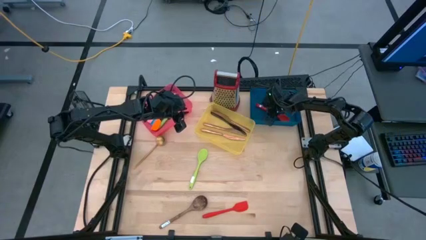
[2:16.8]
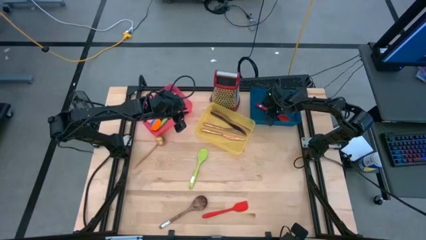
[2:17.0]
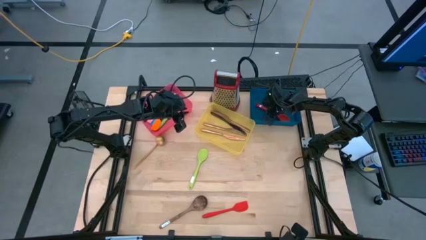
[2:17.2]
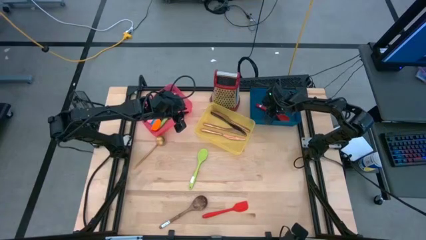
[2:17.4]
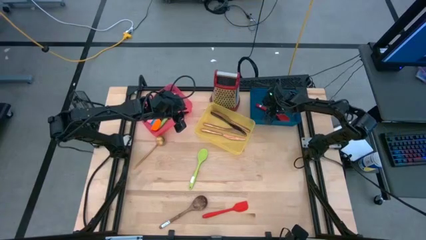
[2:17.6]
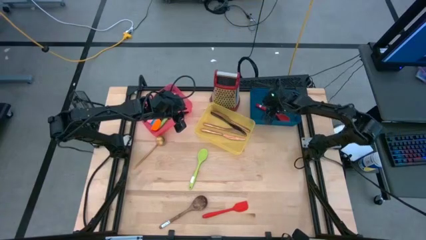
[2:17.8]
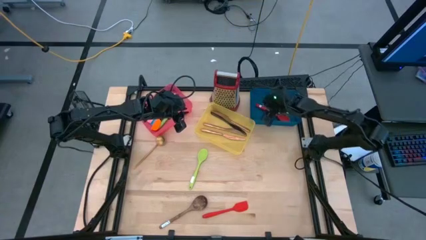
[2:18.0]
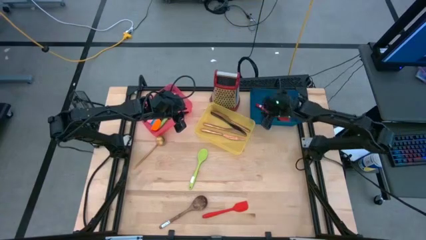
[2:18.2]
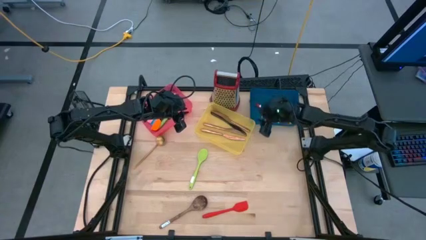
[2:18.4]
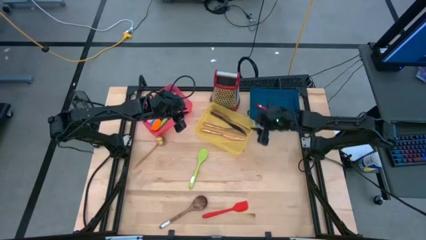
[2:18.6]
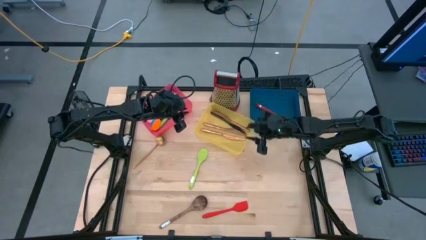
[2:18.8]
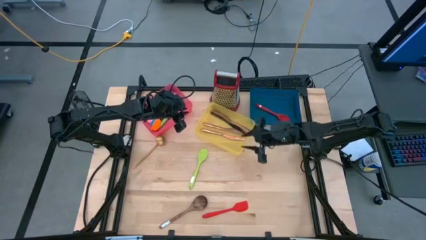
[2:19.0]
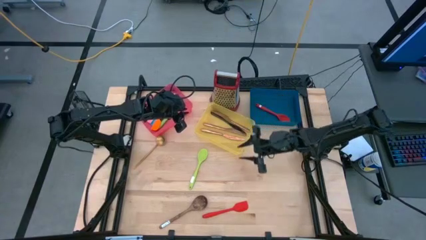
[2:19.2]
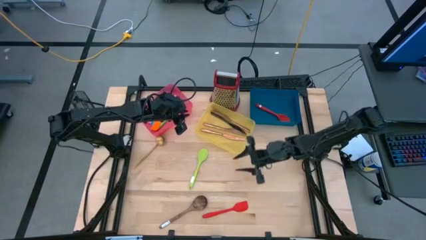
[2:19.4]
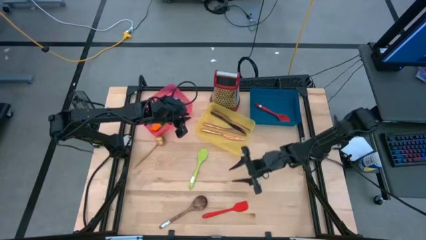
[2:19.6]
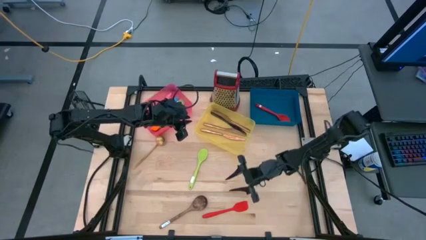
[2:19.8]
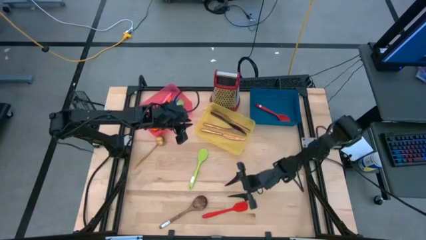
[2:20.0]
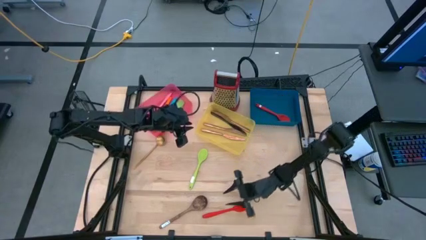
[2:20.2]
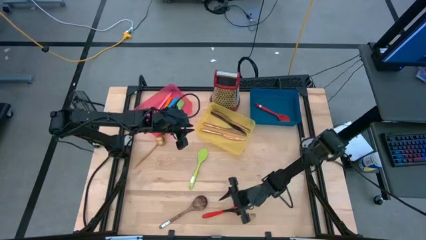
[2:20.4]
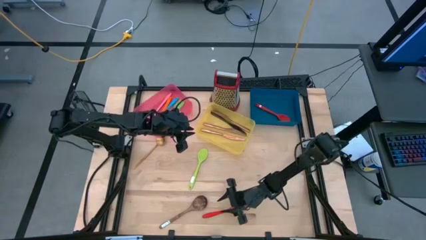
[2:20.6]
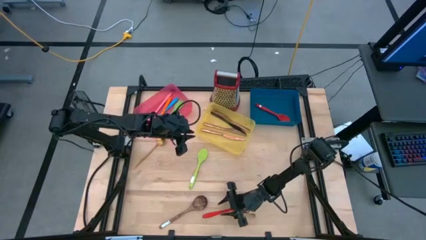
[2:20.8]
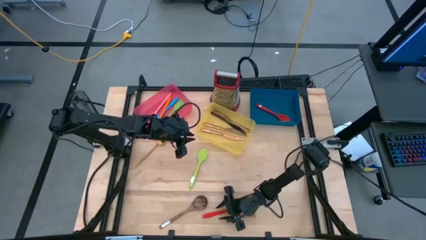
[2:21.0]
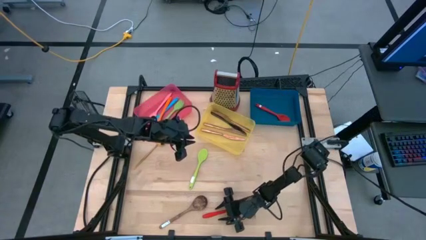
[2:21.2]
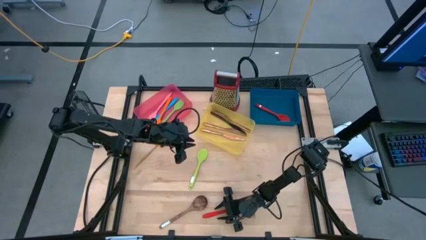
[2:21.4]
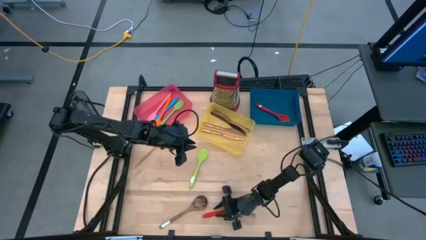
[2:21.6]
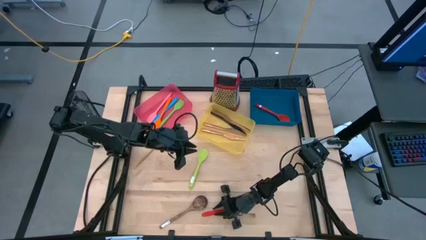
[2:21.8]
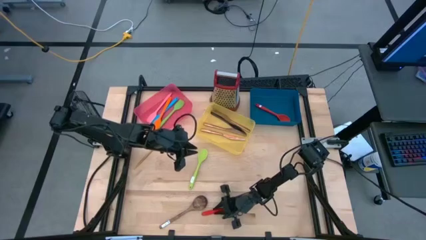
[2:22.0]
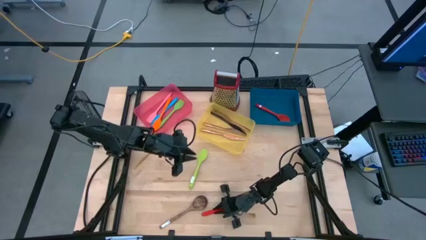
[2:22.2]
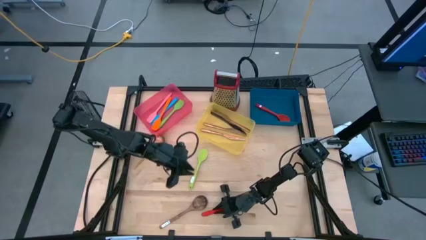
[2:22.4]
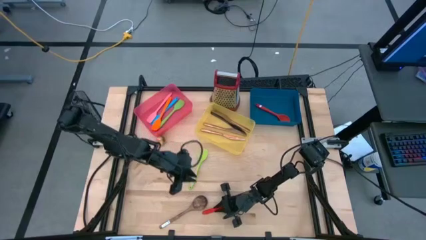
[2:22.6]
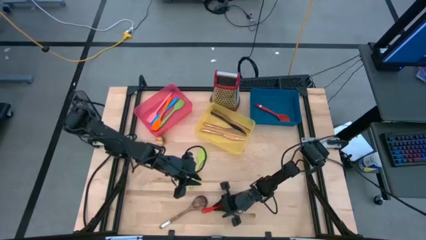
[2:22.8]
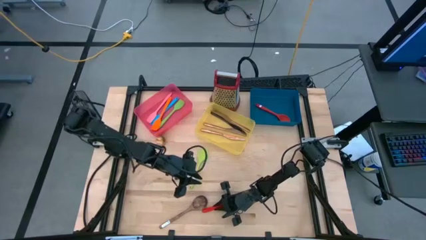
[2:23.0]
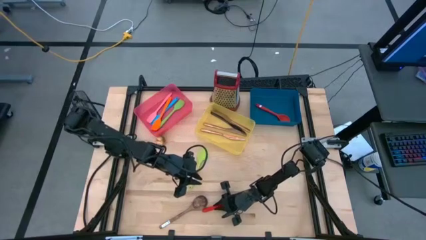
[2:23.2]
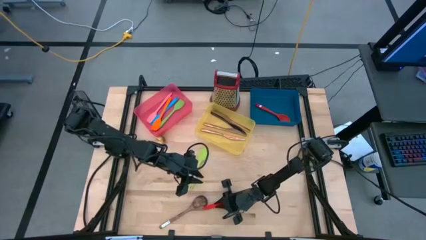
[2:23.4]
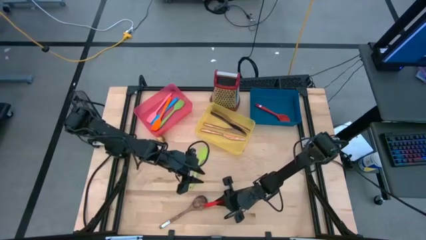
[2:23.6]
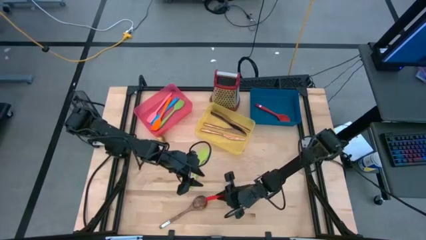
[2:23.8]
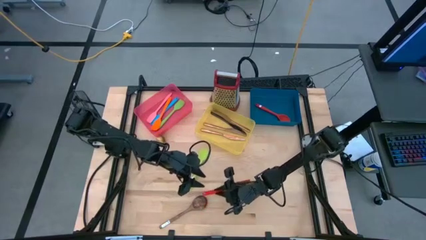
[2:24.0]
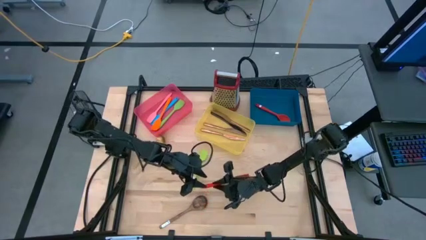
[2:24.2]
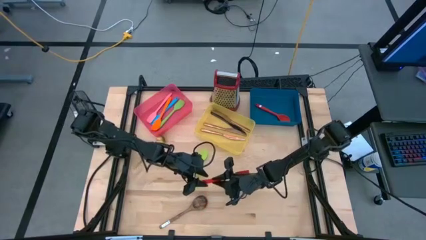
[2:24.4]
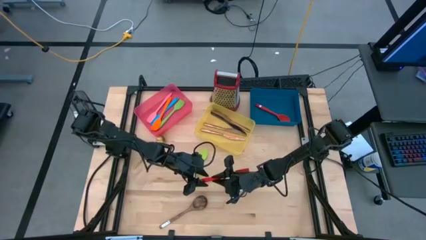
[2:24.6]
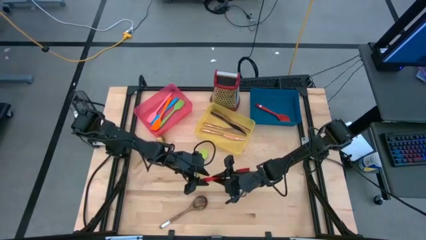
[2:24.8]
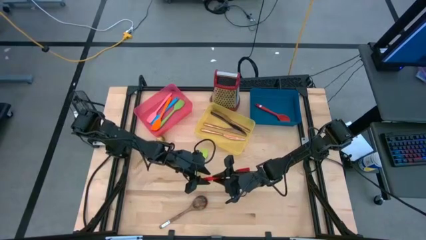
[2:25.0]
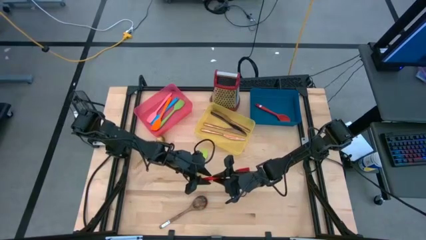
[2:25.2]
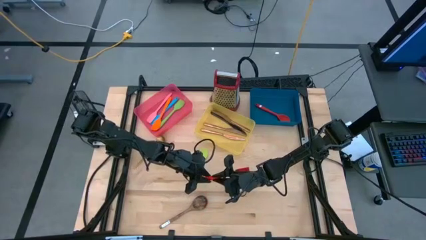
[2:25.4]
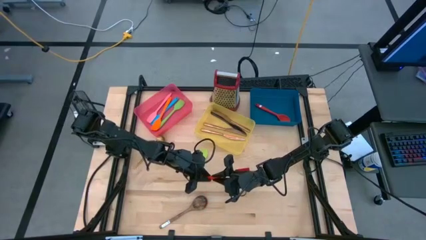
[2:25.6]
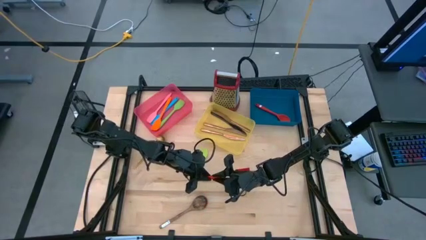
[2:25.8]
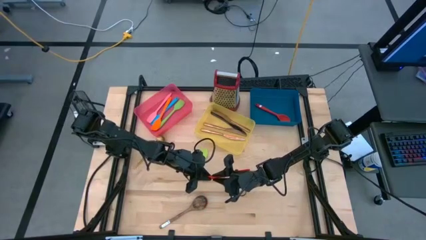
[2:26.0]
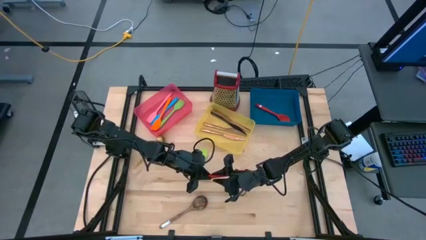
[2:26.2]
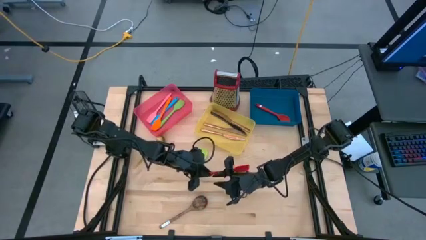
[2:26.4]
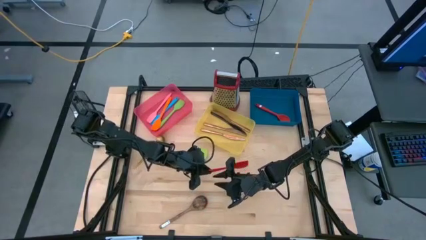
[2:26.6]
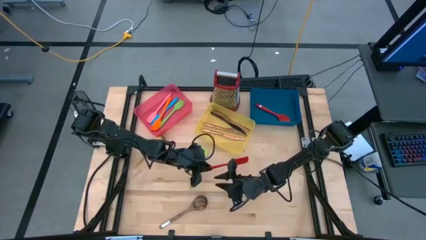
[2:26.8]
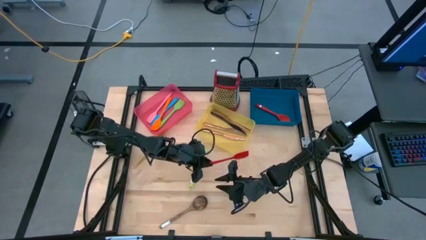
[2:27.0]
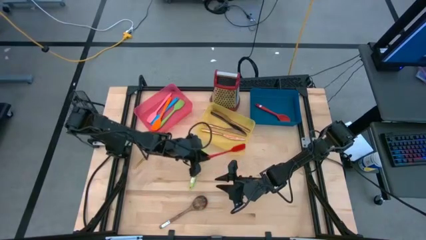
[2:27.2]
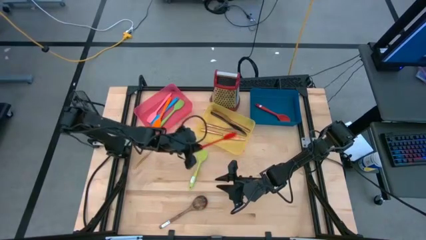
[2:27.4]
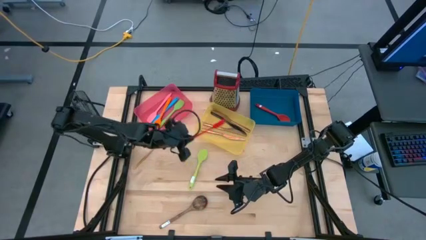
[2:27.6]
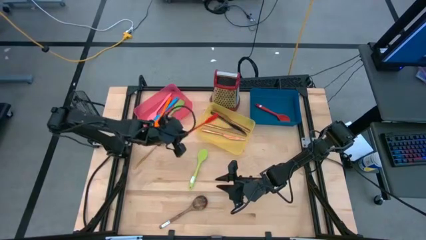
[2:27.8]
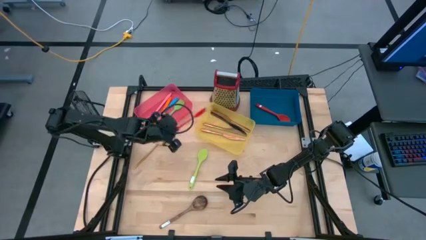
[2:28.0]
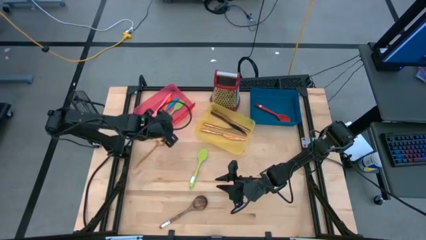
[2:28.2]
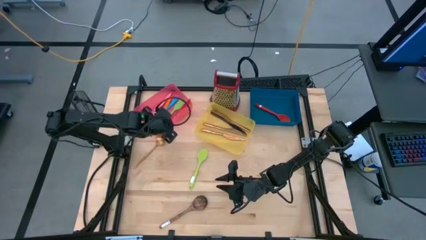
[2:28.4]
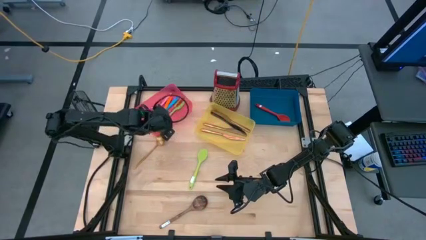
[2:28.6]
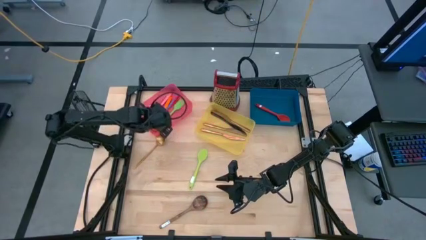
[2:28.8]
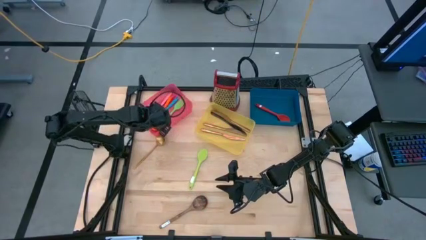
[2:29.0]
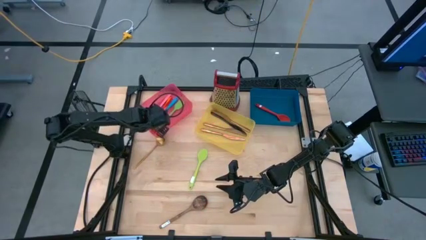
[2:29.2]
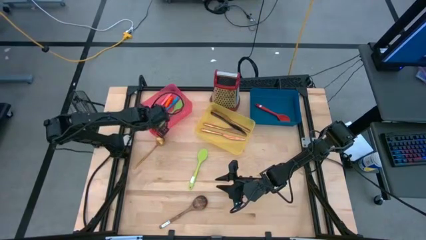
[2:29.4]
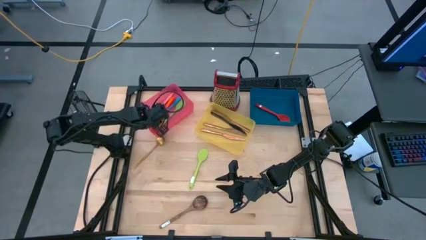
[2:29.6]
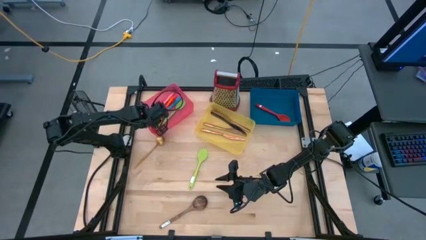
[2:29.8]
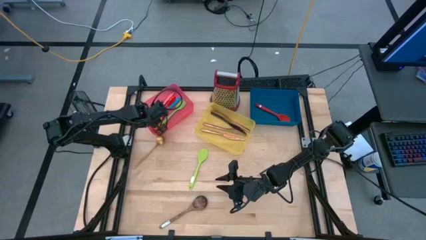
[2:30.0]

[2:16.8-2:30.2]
Task: Pick & Place Kitchen Items
Put the red spatula into the red bin

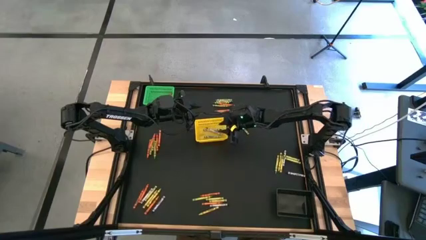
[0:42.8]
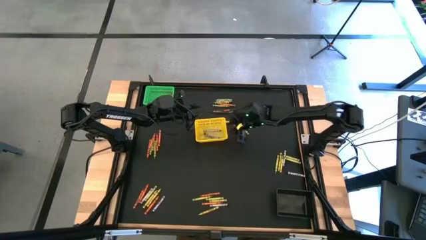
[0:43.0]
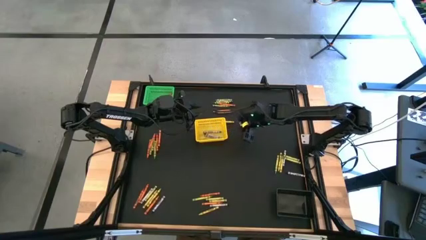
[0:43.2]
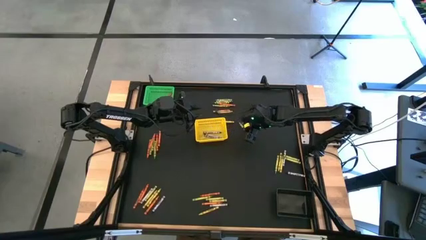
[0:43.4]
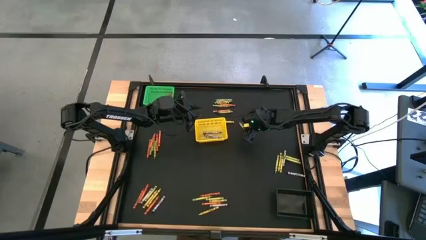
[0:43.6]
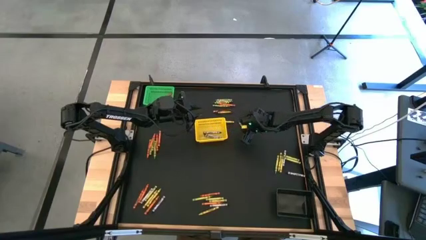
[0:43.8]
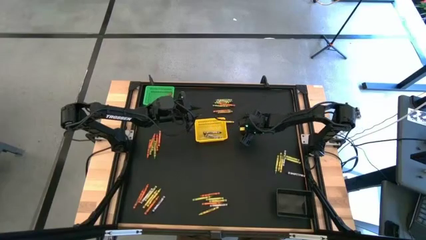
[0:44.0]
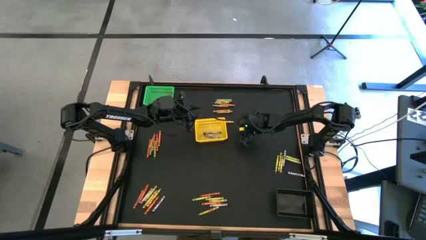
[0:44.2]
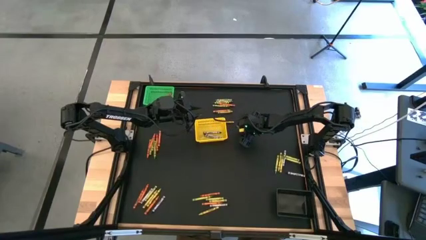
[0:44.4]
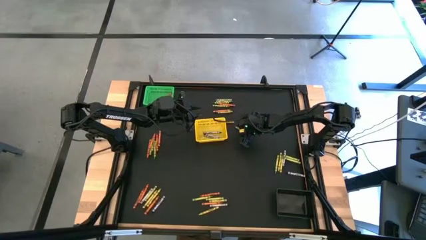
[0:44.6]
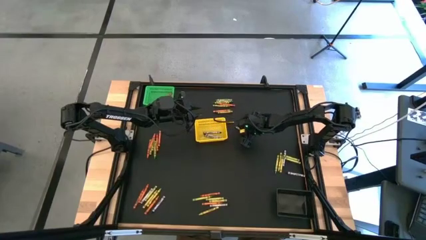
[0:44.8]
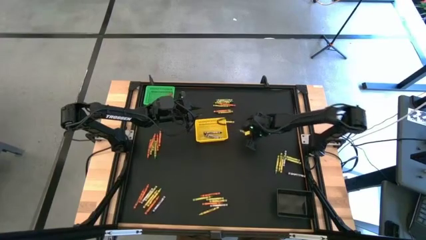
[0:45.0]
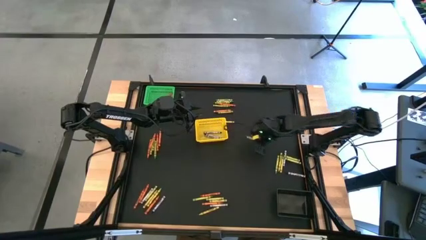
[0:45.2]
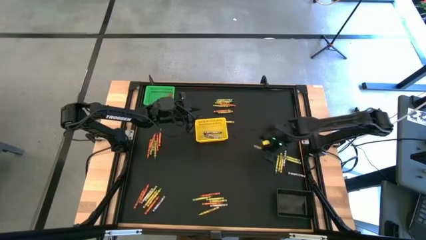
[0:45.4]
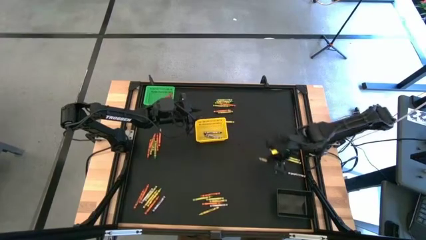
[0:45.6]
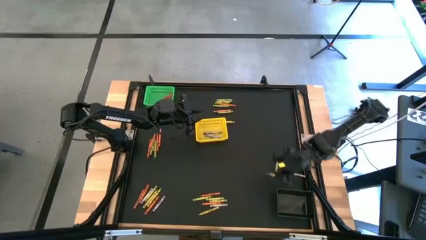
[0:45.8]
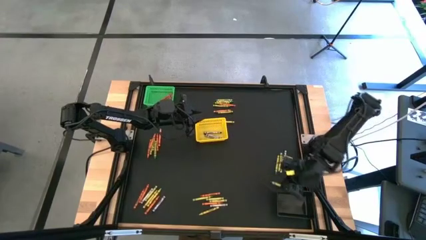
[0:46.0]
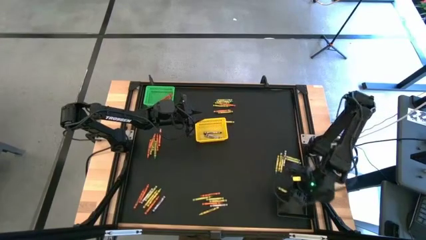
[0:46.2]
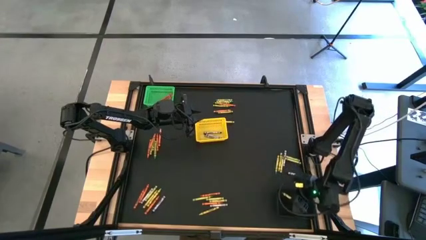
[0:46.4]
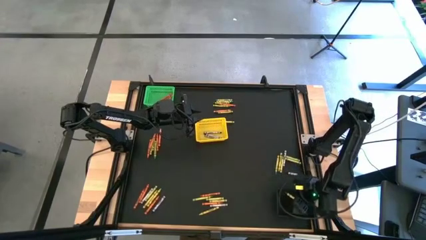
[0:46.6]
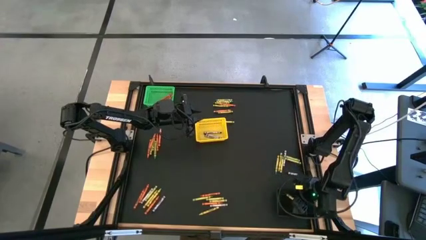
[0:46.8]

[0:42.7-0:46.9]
Task: Sort crayons
Put the green crayon into the black bin
